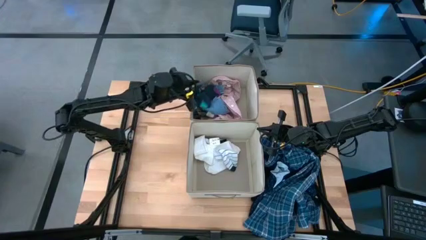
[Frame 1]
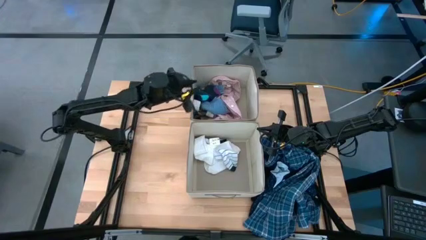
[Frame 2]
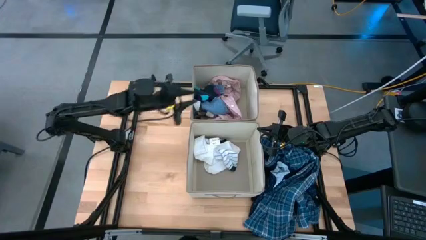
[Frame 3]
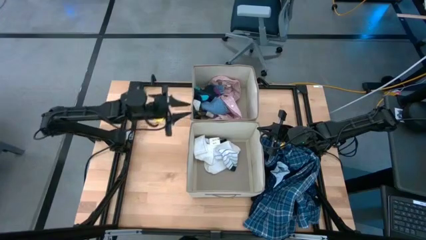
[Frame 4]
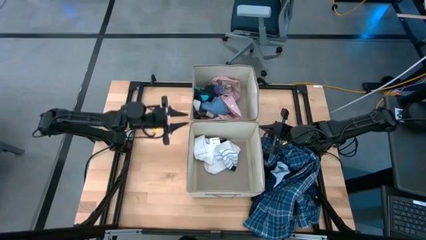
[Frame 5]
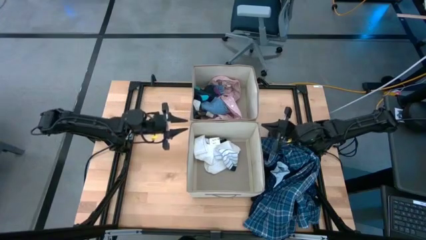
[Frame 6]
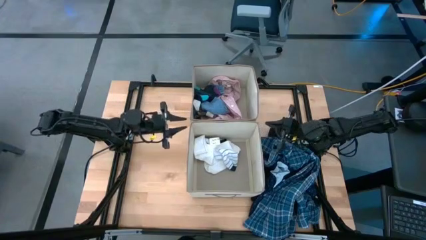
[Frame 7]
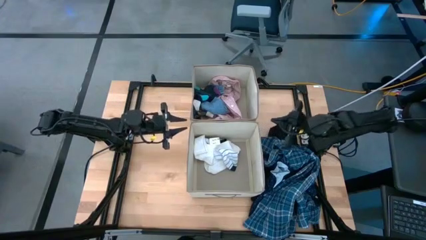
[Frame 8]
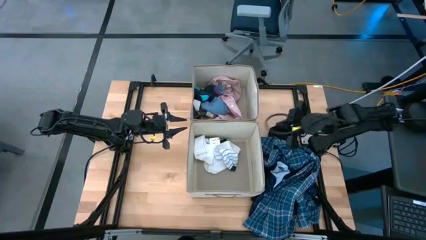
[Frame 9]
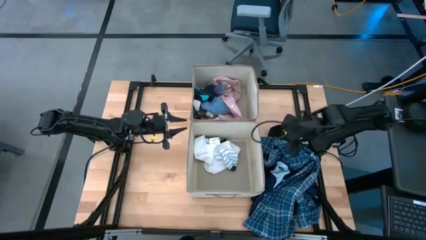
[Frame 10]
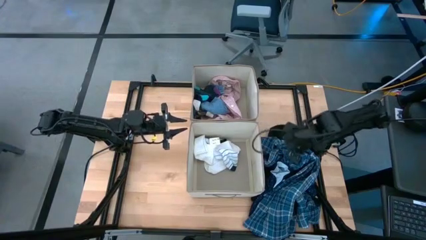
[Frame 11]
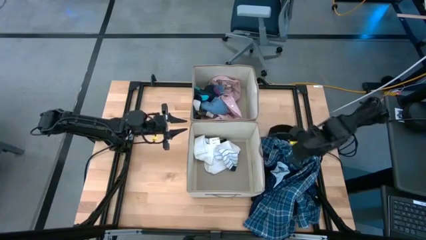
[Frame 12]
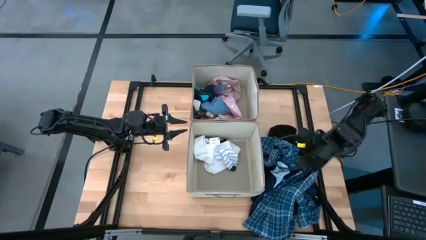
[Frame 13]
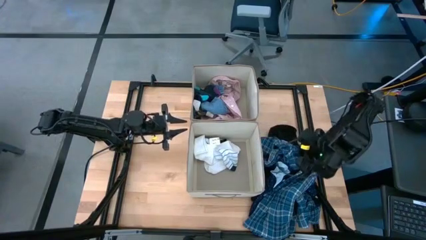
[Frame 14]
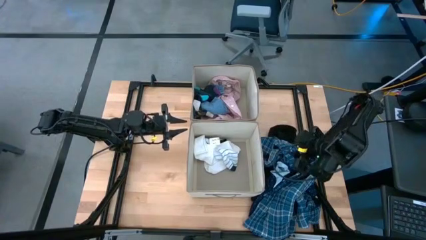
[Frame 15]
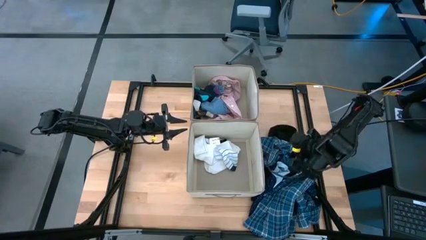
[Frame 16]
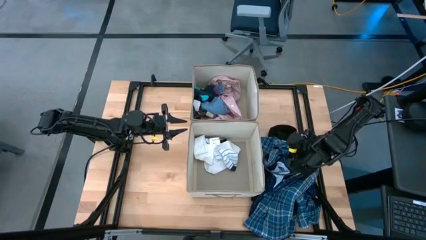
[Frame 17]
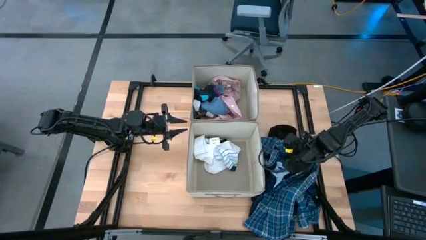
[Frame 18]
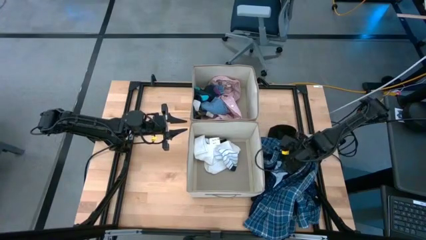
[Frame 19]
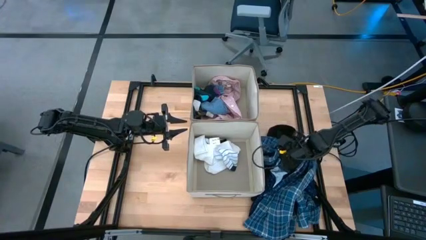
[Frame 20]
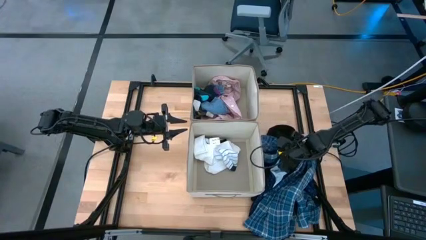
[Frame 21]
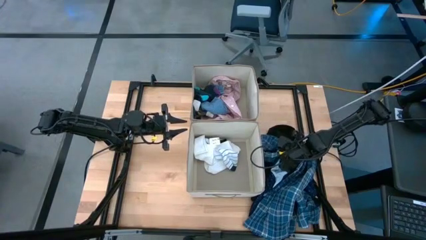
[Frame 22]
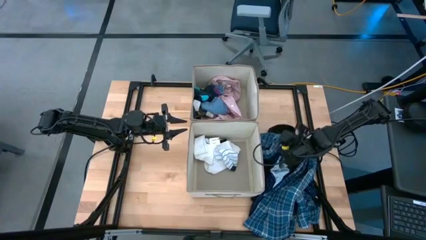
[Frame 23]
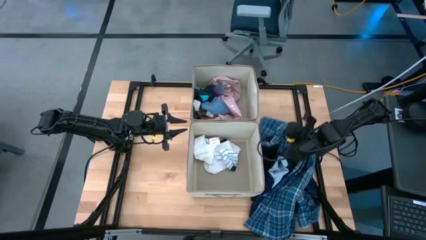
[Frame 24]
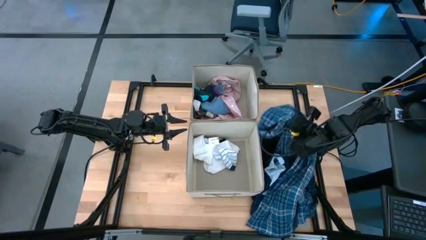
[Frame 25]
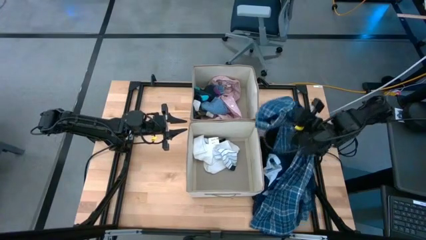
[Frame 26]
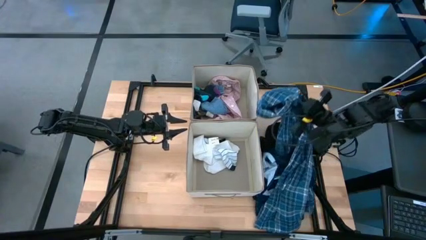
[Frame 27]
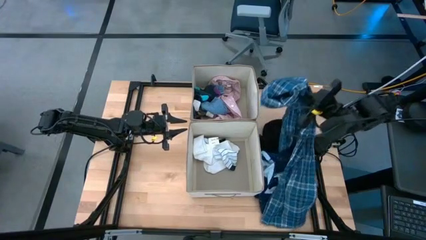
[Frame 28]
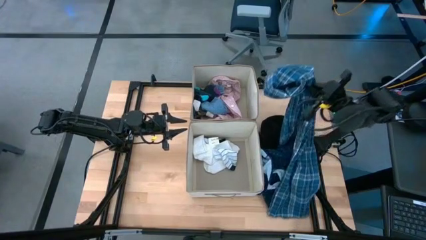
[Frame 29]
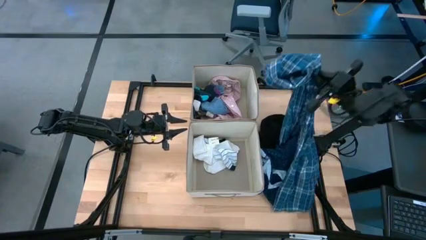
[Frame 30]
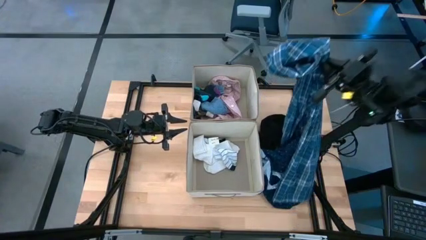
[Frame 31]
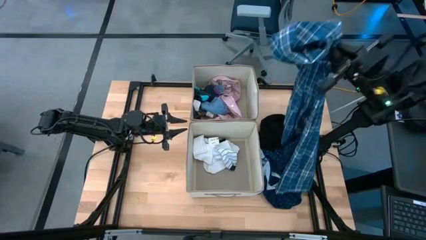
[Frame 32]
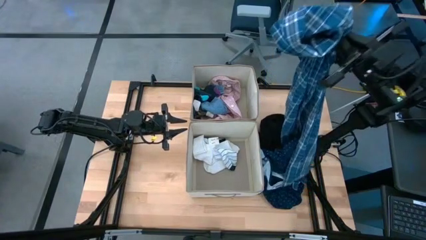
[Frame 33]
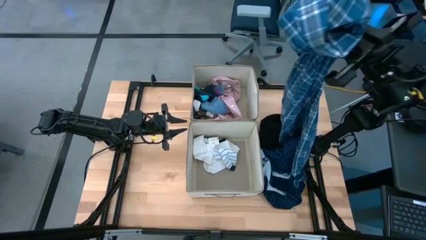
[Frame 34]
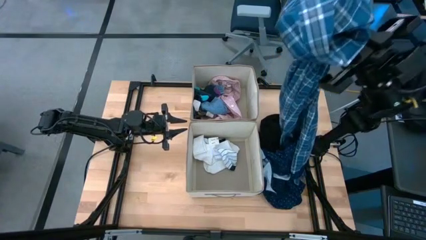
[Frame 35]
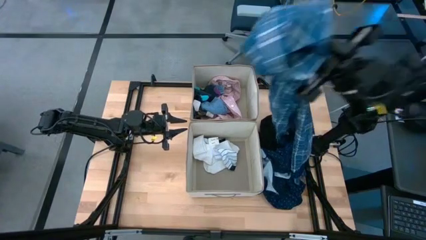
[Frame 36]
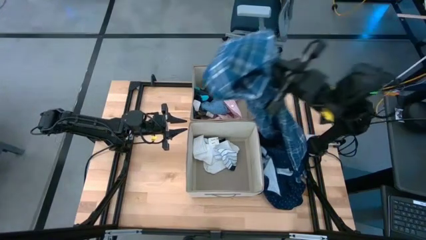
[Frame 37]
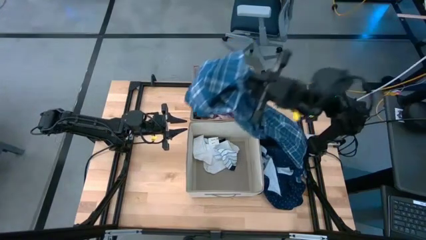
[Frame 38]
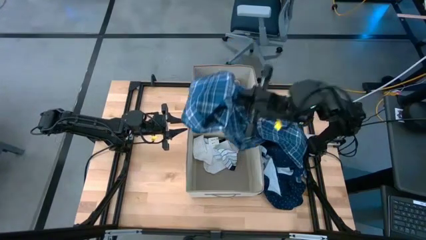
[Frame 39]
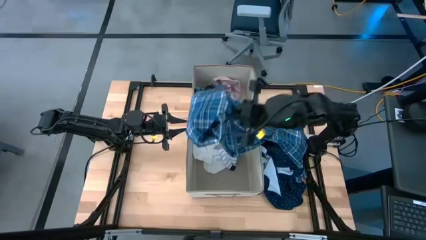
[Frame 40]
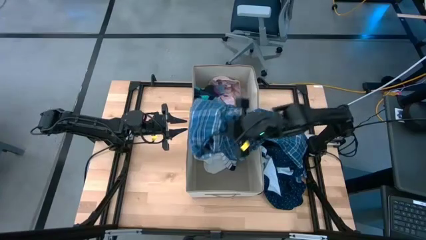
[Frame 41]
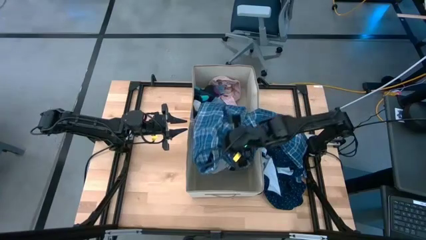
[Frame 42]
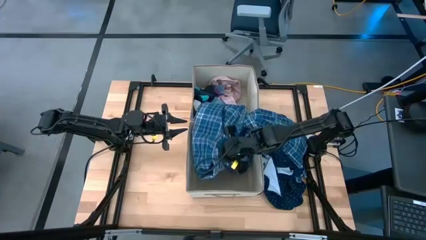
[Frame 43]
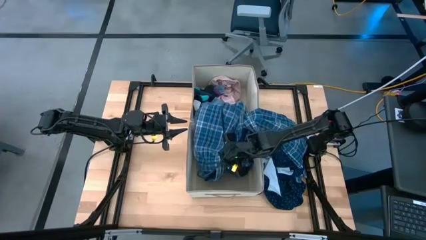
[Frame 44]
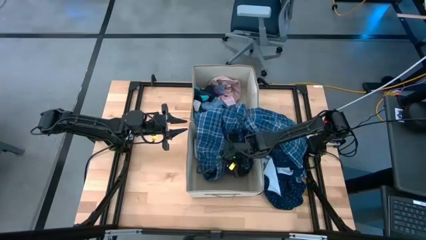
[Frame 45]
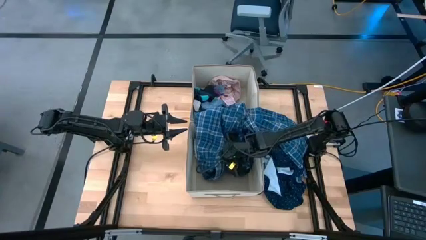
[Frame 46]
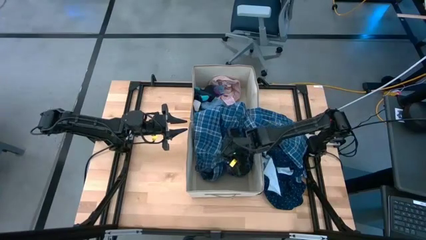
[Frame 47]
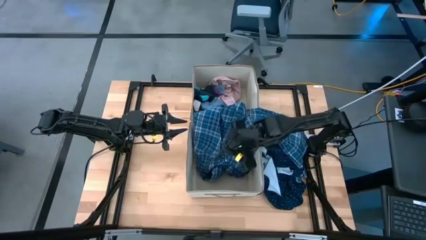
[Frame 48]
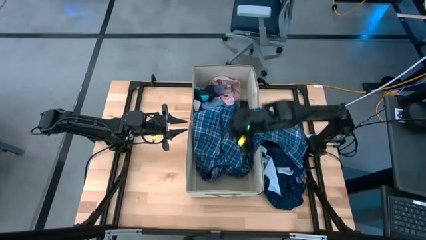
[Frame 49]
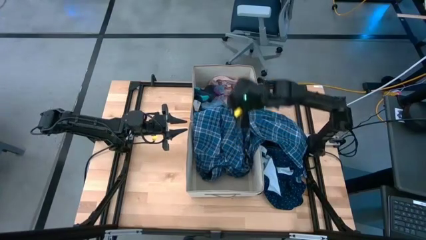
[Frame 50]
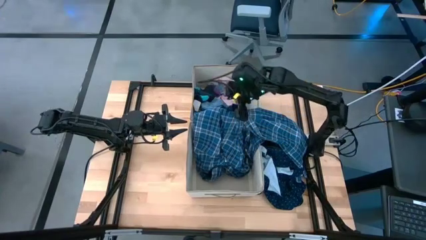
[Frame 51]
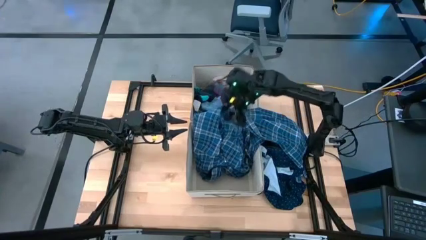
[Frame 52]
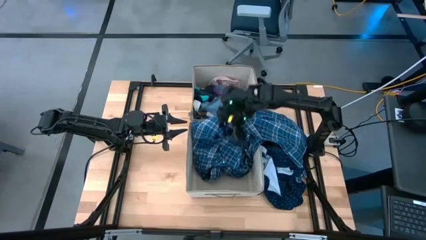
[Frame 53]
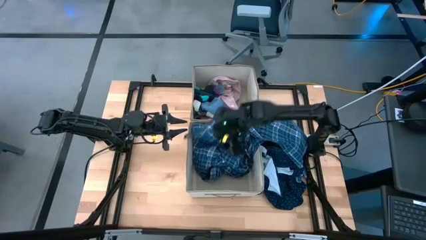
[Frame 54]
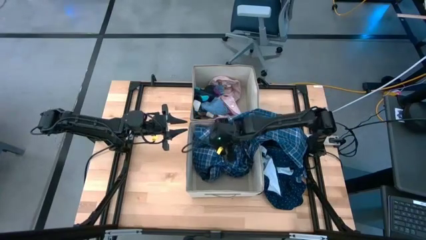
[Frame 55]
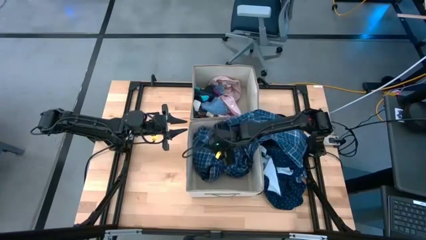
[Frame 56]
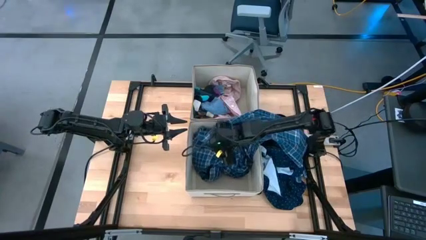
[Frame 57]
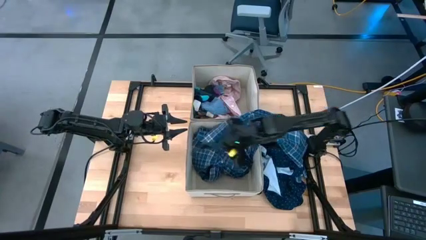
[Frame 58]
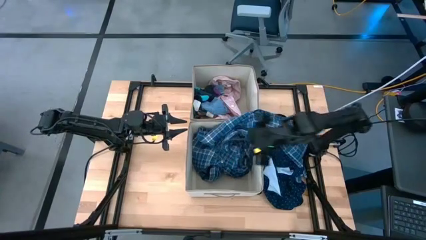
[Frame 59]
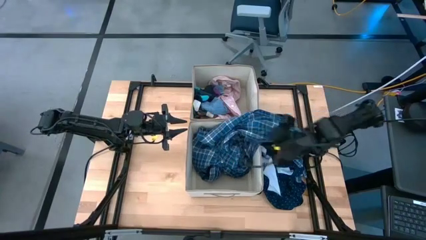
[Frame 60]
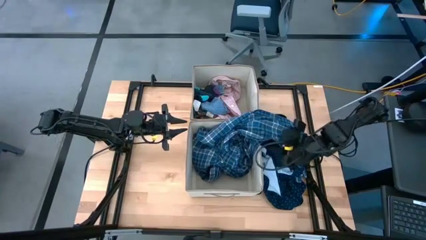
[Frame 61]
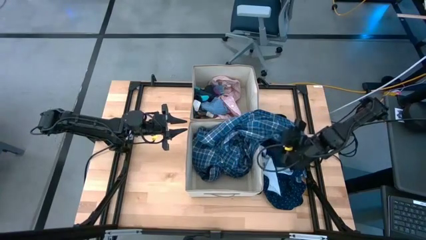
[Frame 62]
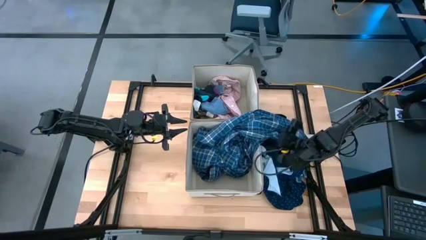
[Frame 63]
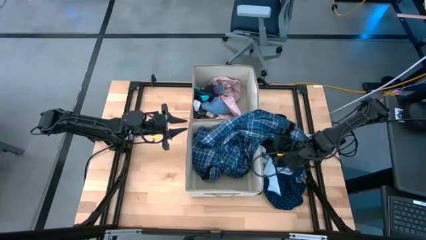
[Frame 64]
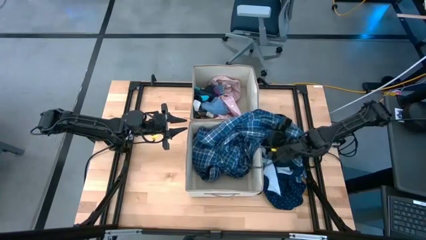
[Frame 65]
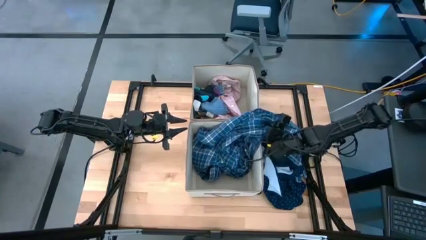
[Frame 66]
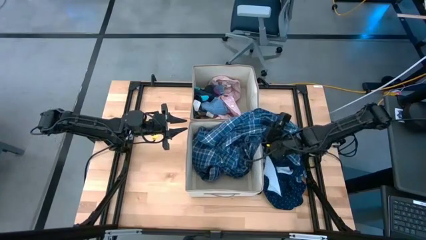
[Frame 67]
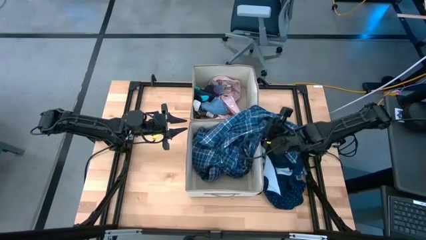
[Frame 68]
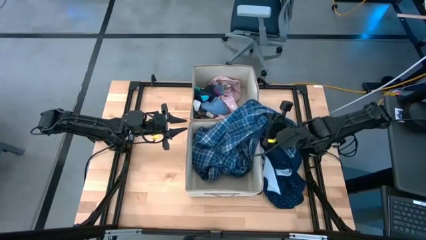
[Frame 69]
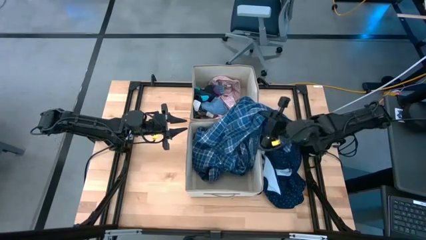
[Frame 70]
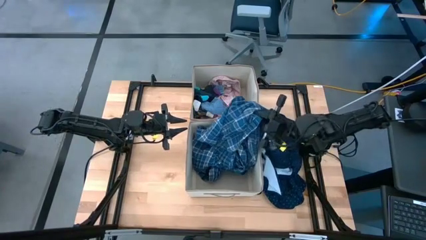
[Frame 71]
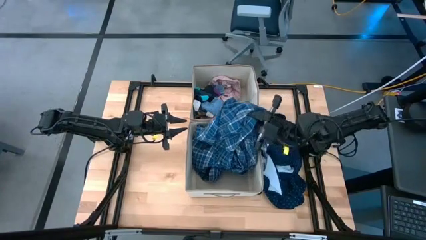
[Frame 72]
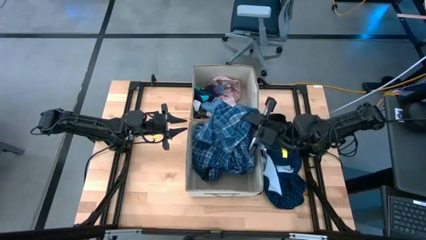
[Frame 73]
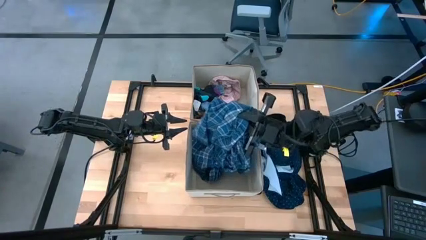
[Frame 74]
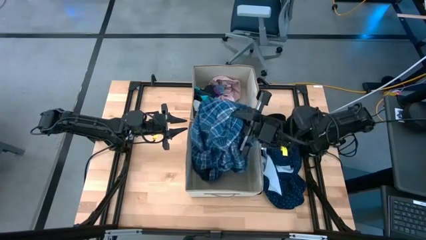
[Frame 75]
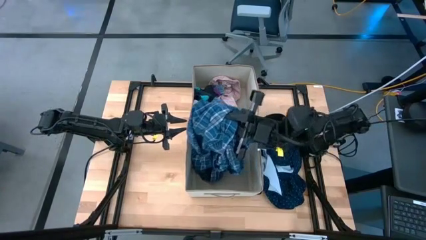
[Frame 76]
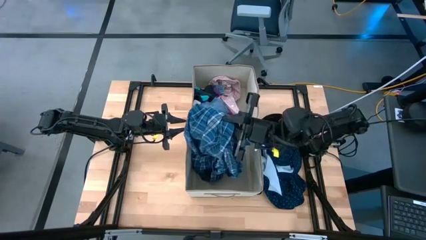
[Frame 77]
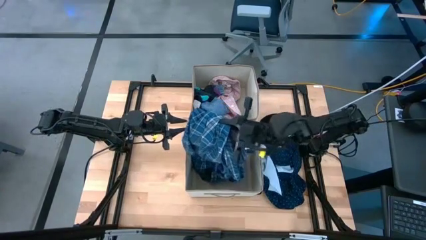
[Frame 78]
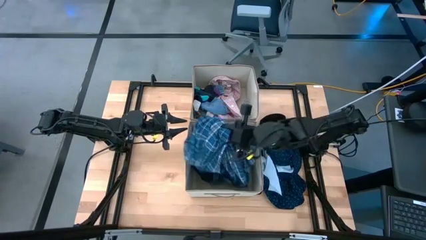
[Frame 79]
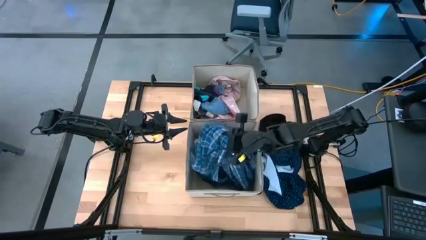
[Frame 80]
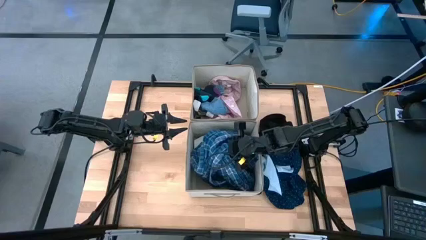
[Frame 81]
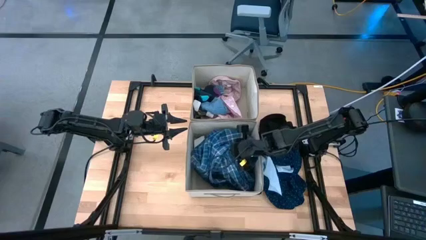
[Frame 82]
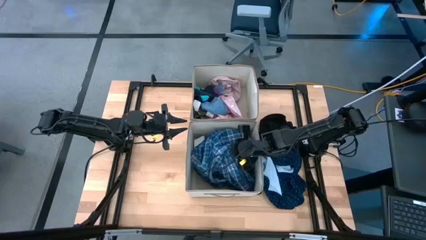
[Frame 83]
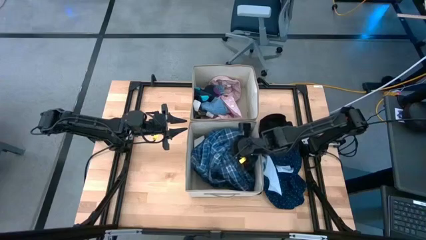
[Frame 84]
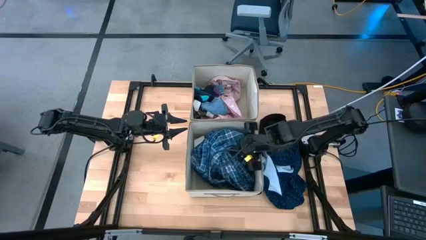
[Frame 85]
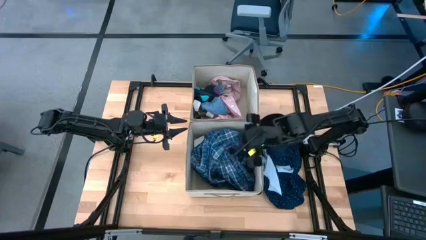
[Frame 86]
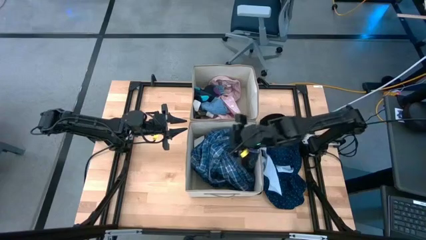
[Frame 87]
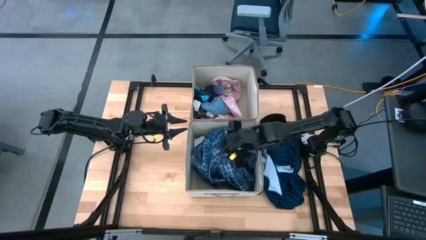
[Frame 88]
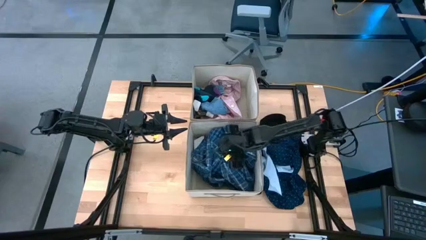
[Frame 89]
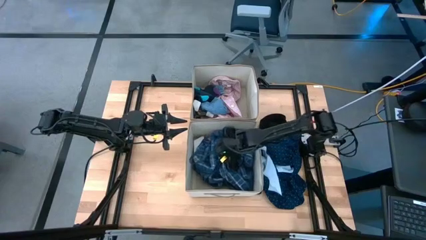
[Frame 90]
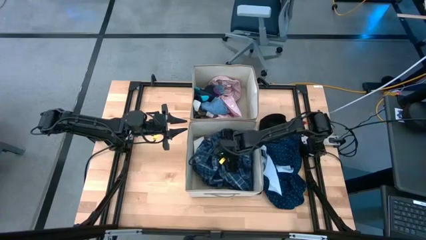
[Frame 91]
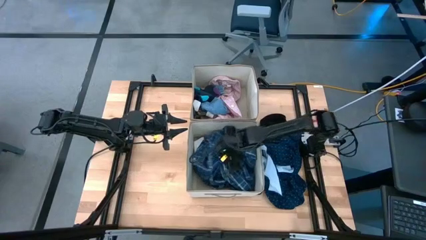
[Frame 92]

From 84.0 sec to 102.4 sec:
Task: Sort clothes
Put the blue shirt into the bottom laundry organizer
